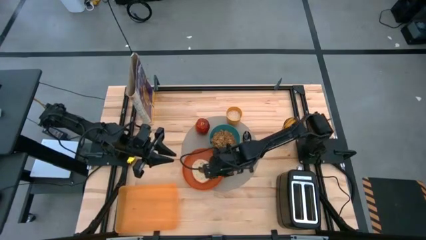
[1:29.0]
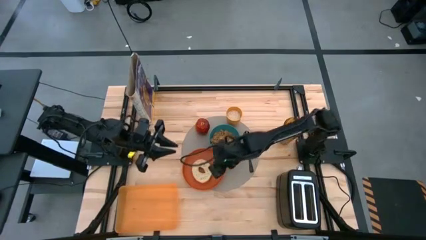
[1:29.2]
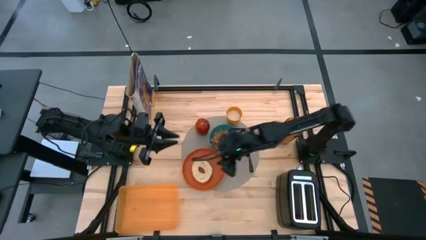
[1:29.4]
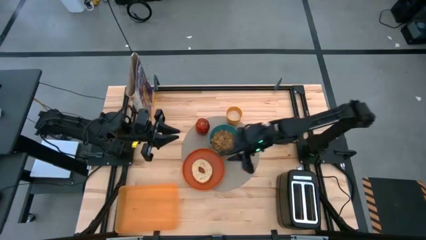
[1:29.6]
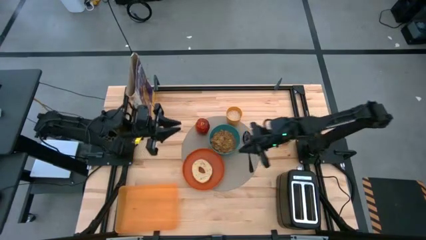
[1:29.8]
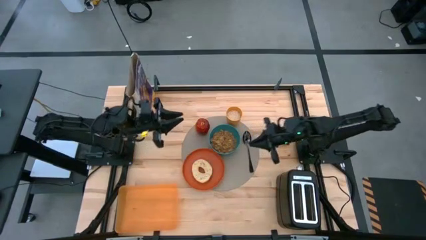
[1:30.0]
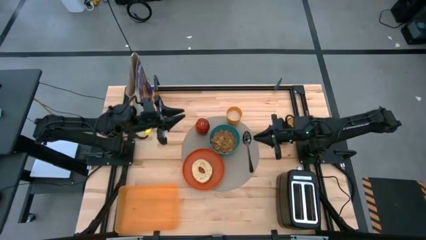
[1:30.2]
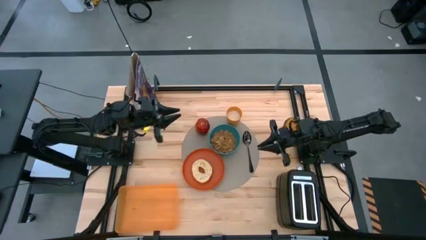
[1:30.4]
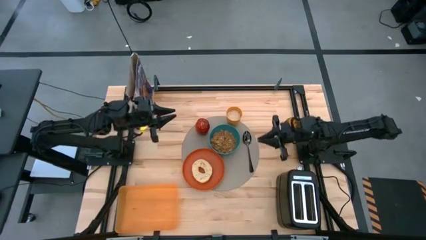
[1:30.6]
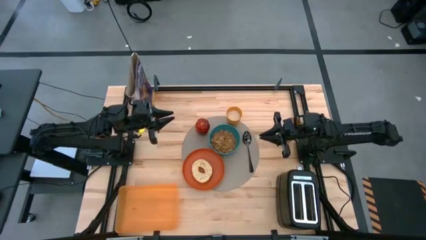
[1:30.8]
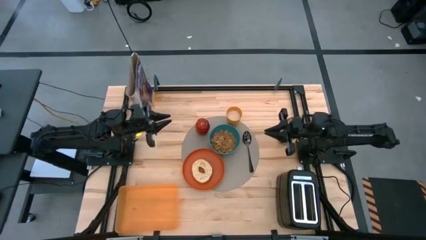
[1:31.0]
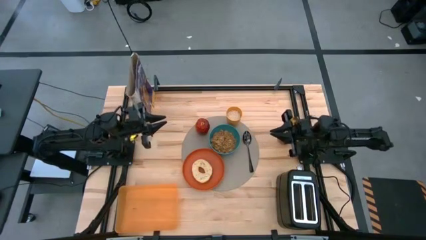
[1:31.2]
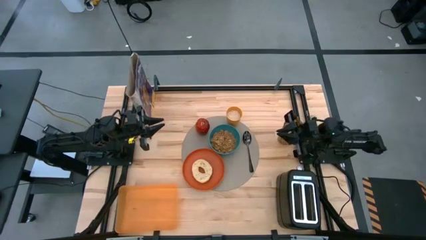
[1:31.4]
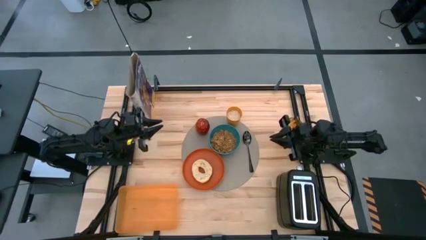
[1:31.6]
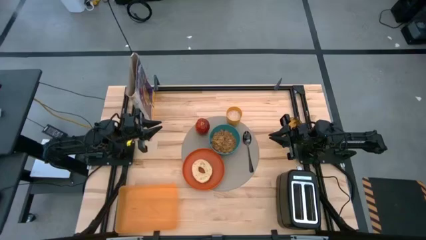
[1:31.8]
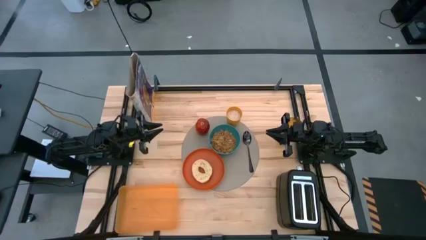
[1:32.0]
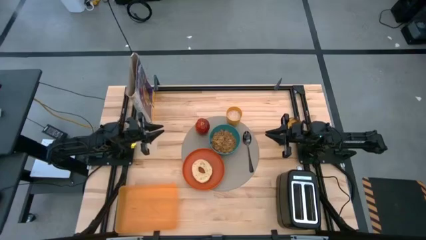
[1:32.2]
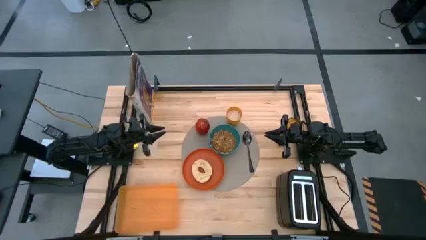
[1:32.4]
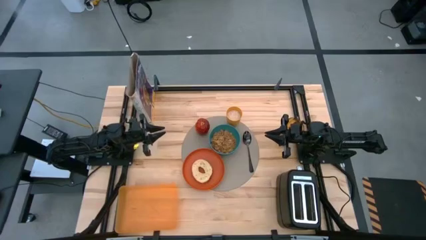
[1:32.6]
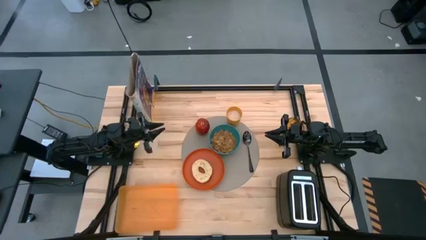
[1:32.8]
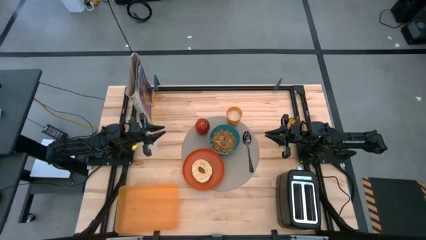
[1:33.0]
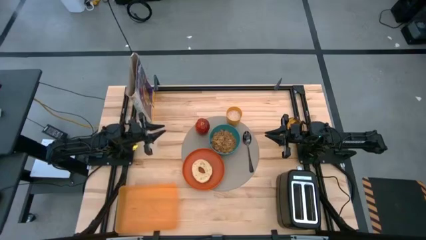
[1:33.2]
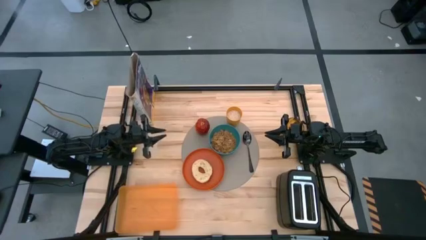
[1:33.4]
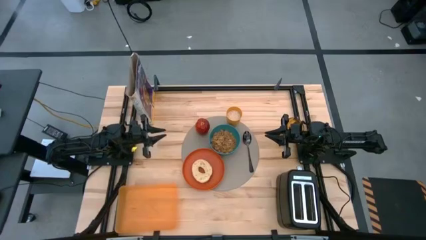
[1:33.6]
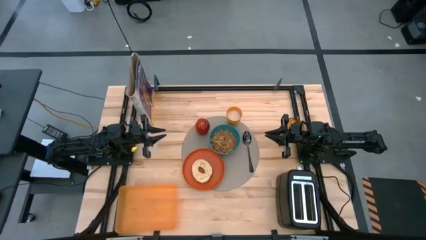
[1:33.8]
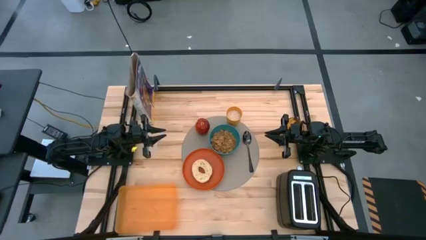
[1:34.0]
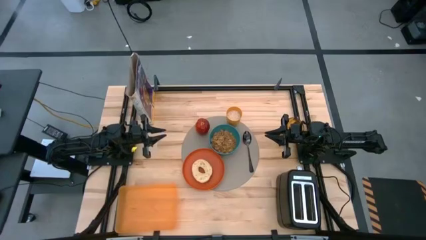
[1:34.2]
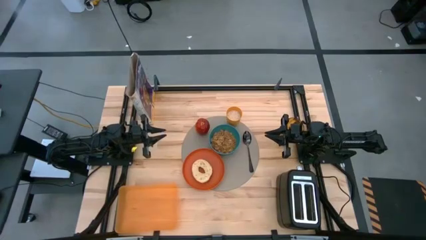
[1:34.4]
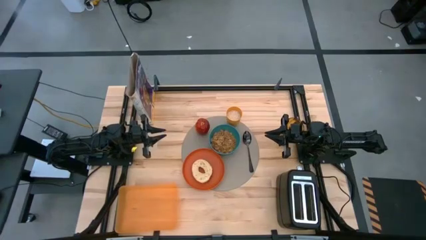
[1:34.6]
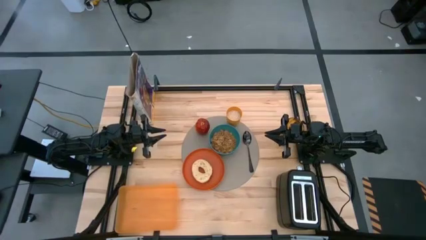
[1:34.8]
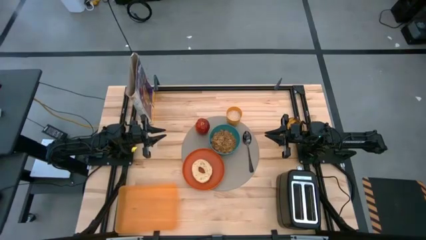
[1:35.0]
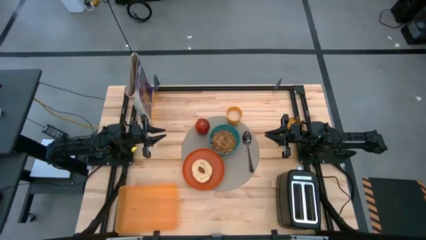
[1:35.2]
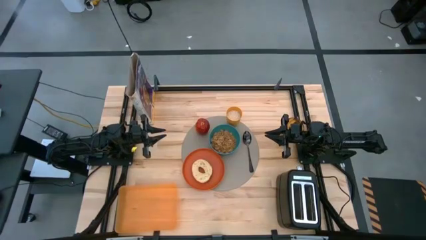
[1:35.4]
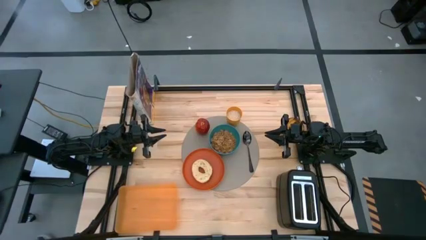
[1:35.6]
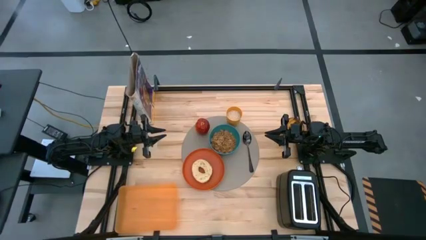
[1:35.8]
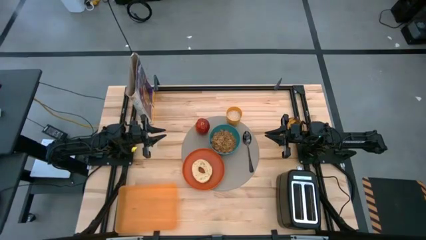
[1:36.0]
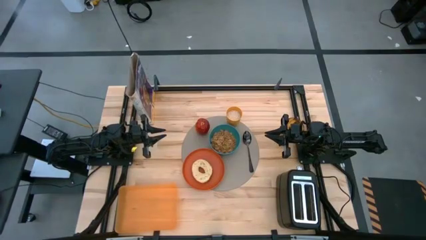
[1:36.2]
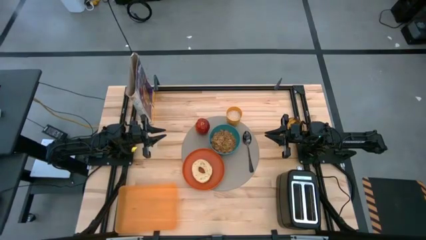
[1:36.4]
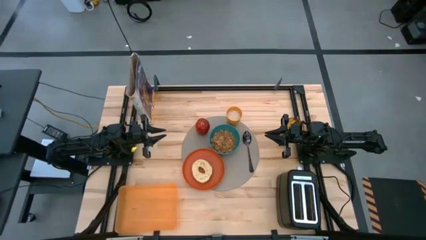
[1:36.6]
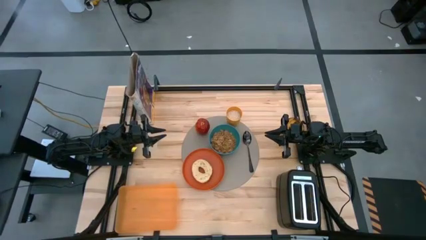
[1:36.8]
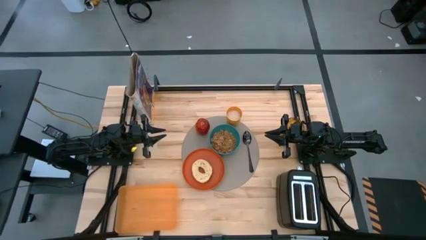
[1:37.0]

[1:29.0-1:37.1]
Task: Arrange a breakfast setting
Return to Home Position
